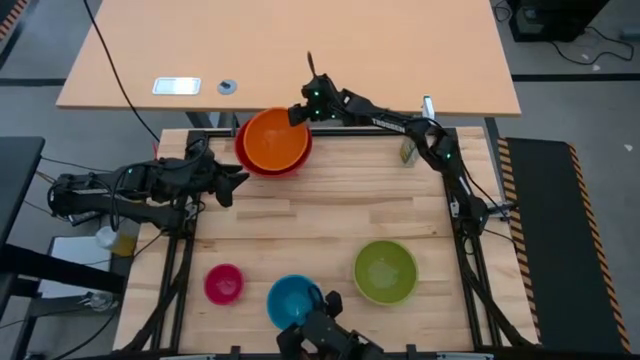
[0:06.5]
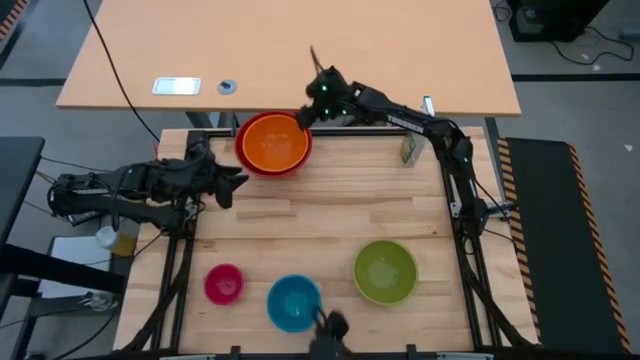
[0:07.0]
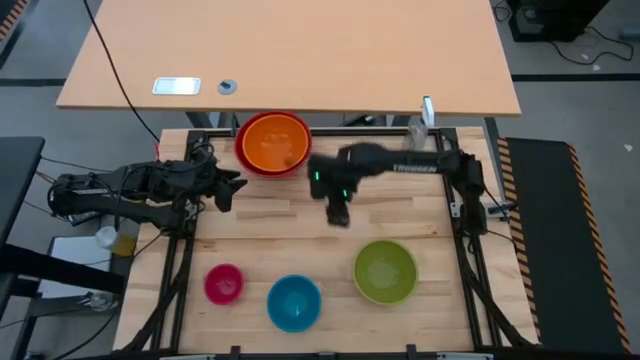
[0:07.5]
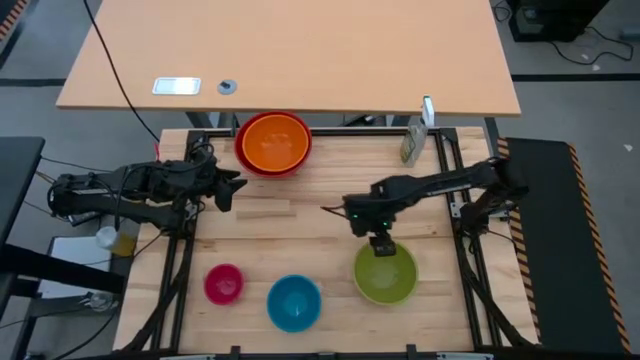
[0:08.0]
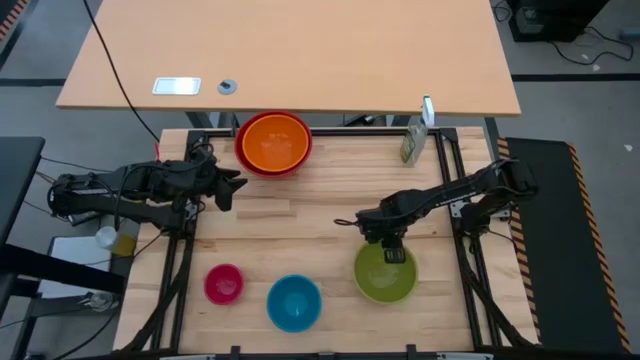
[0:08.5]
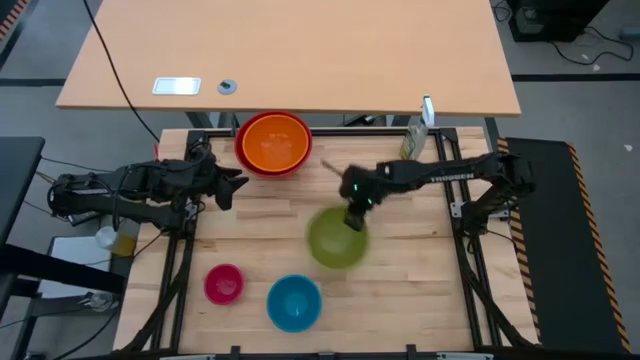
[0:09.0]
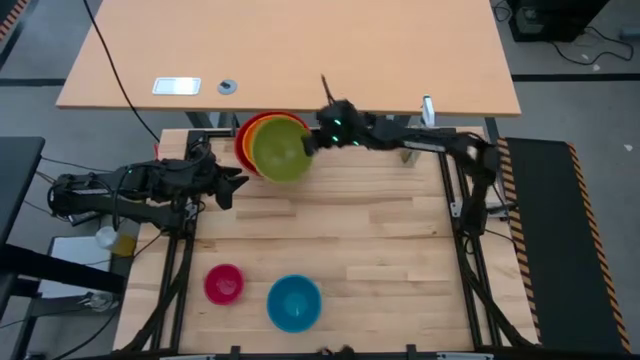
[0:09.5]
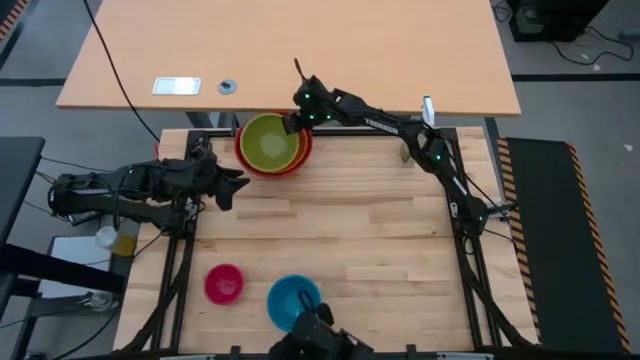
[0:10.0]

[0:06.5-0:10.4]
Stack the green bowl on top of the orange bowl

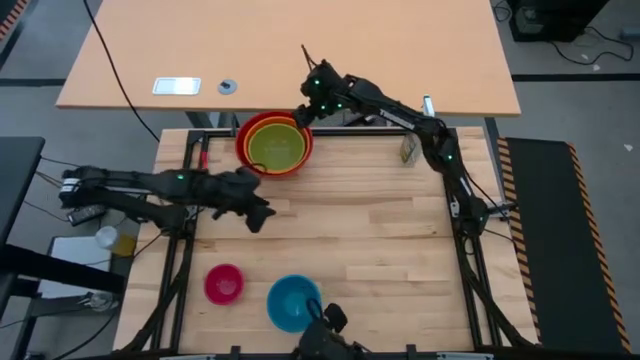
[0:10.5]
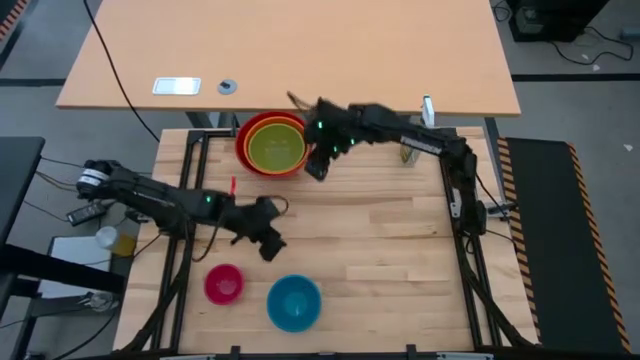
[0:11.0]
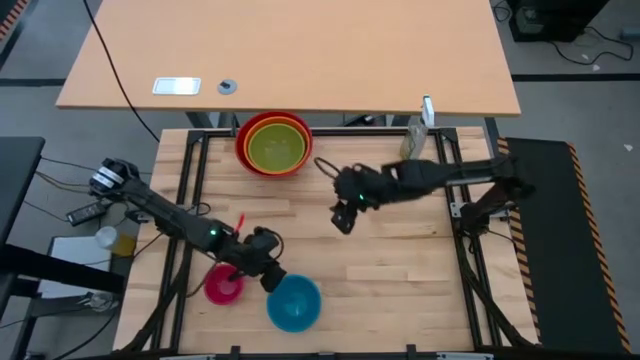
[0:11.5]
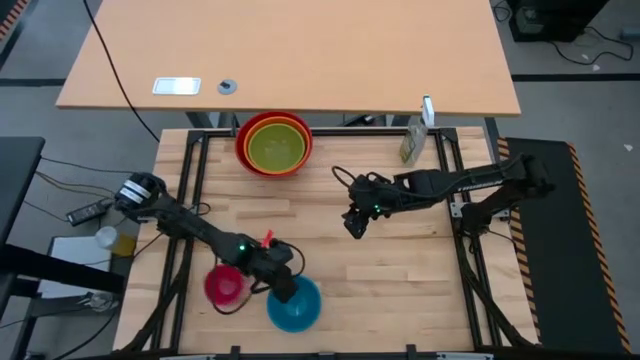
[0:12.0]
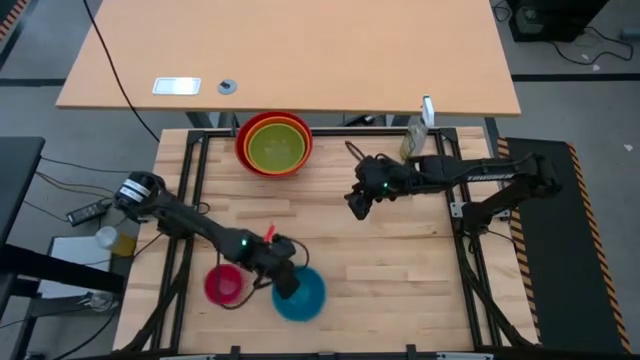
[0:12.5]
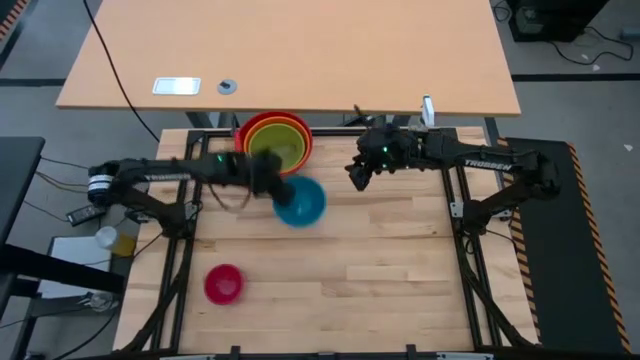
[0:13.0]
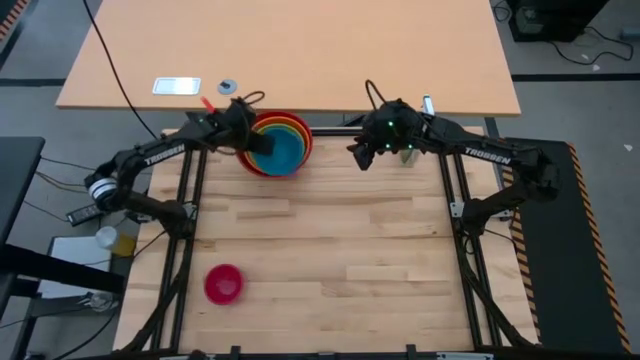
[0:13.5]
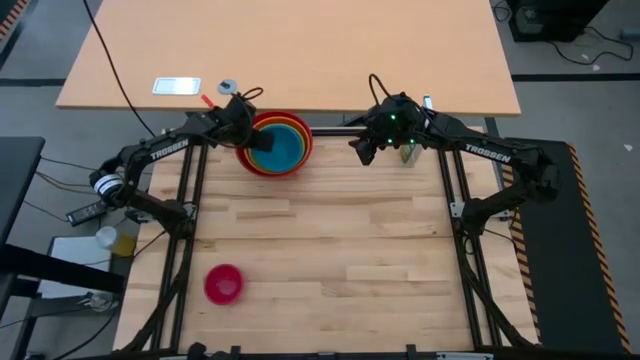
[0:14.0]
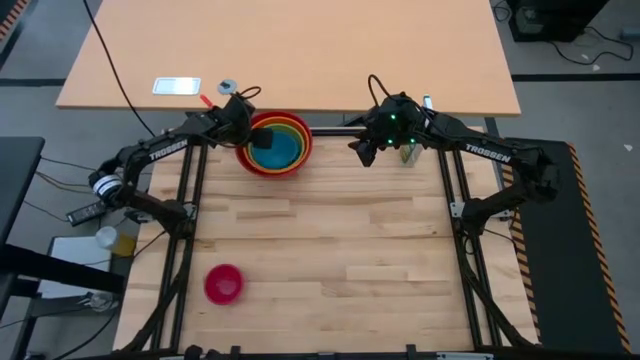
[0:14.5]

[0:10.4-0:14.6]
Stack the blue bowl on top of the green bowl

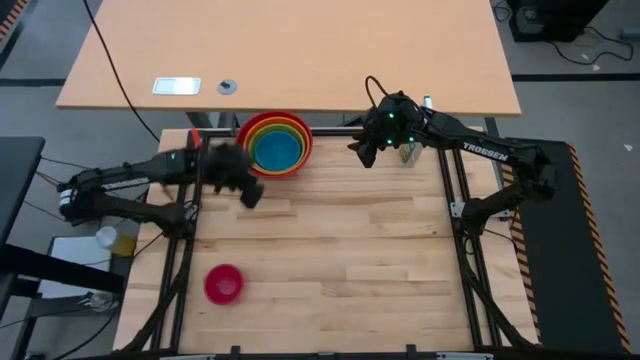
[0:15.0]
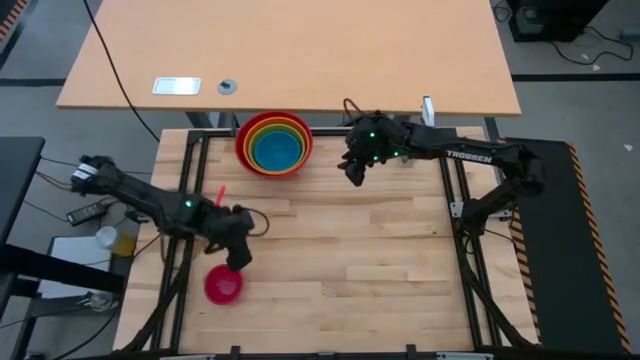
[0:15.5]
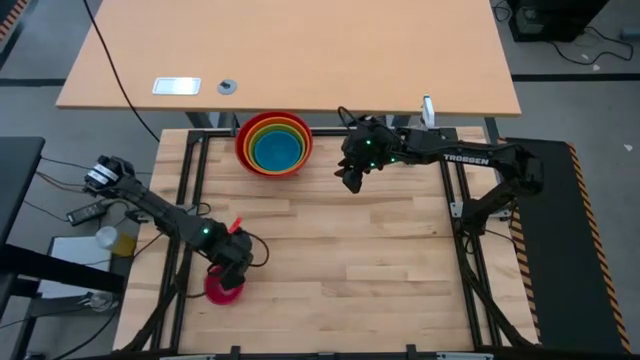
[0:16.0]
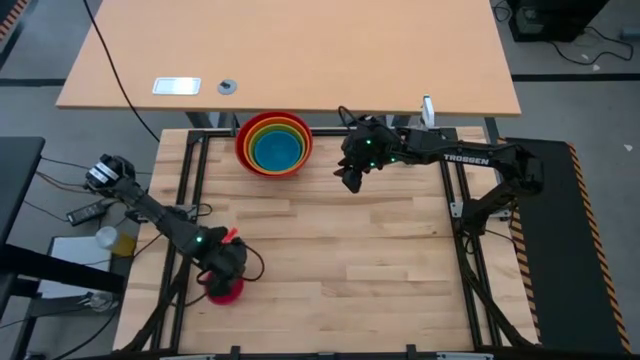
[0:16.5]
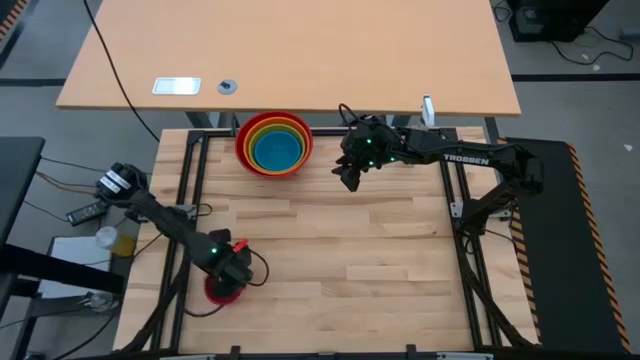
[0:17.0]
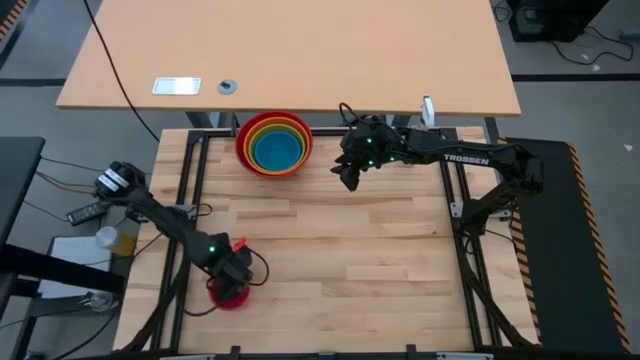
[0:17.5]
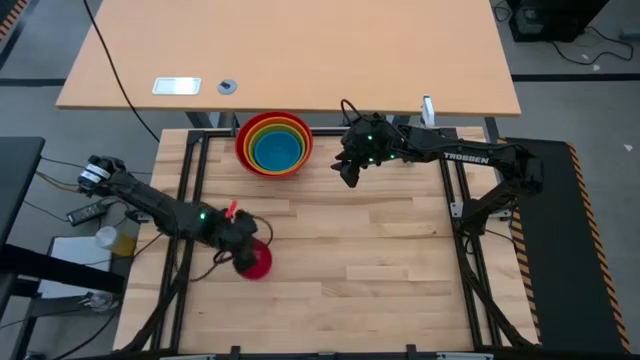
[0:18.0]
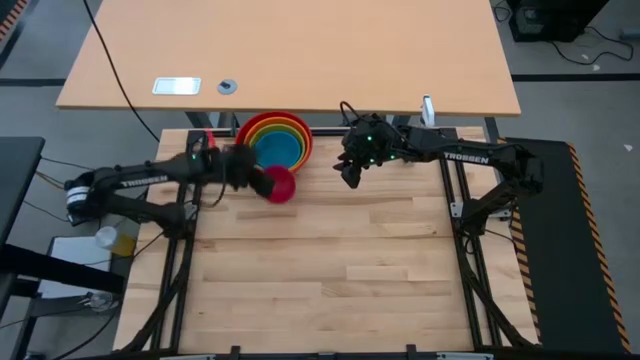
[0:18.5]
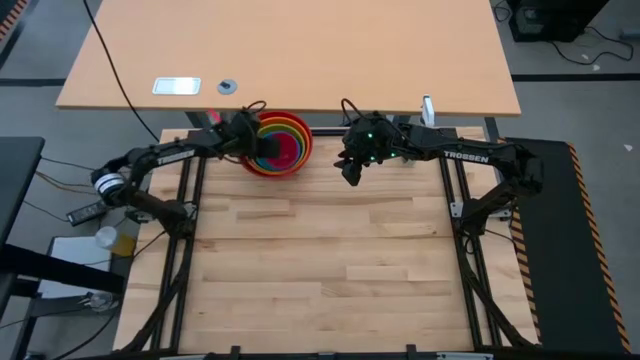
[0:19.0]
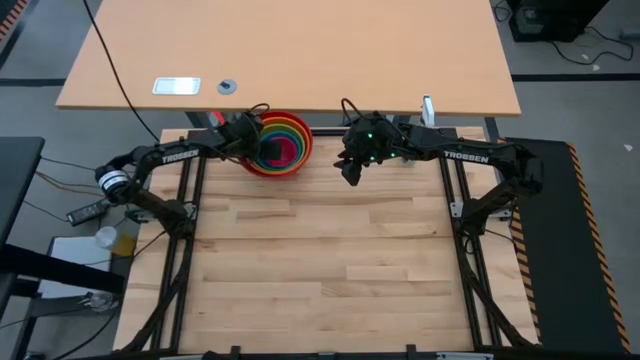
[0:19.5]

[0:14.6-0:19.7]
Stack the pink bowl on top of the blue bowl

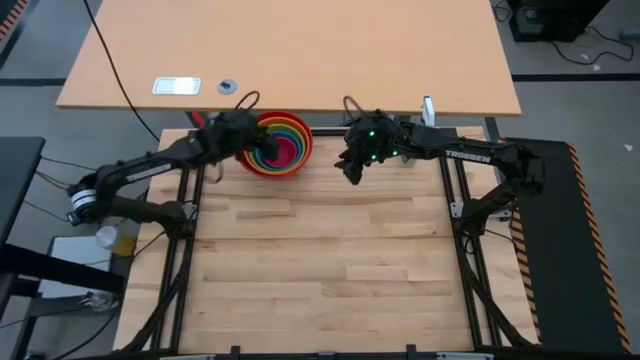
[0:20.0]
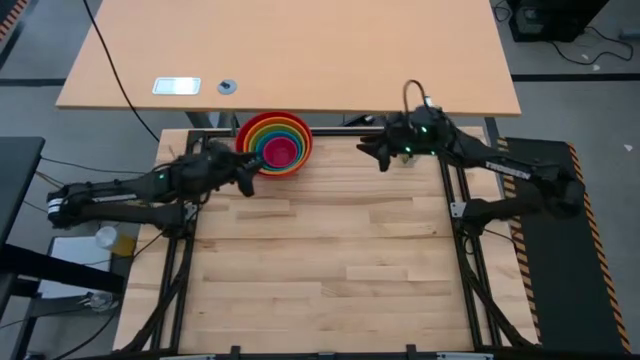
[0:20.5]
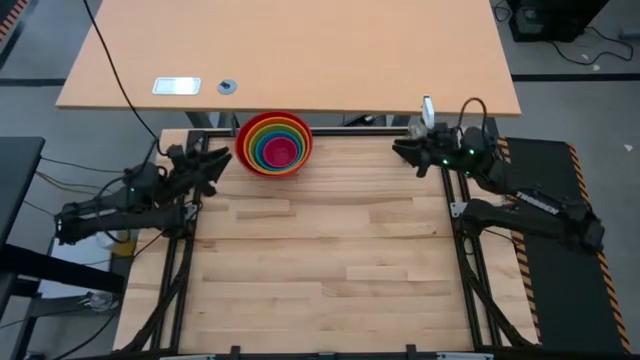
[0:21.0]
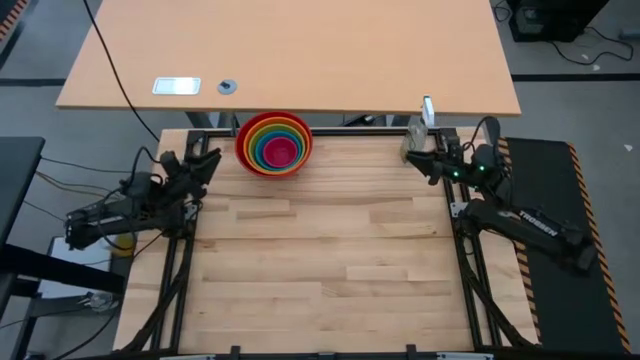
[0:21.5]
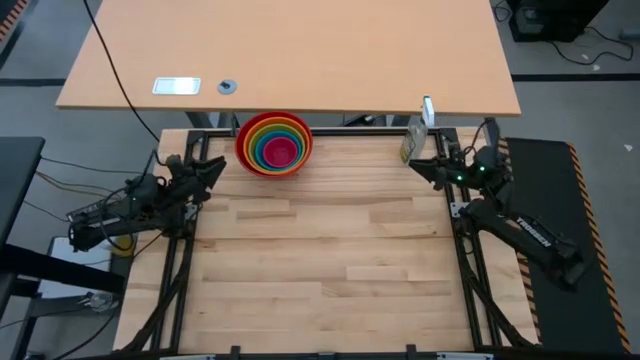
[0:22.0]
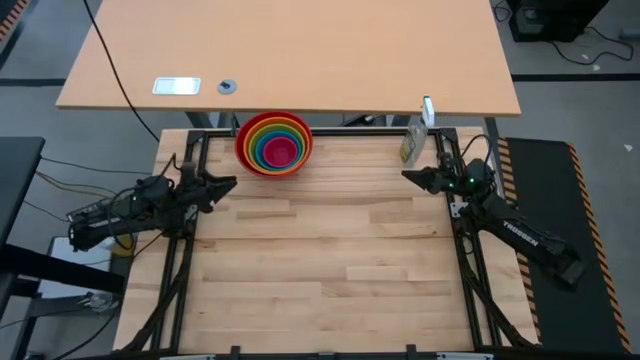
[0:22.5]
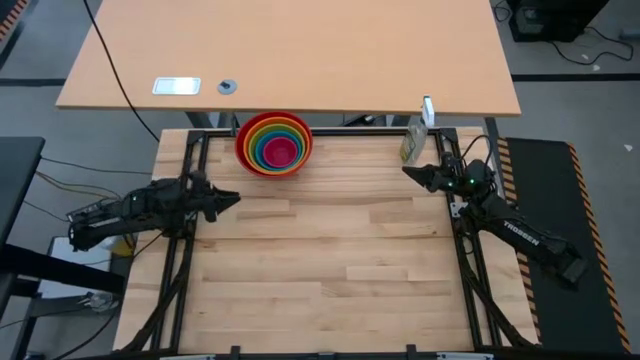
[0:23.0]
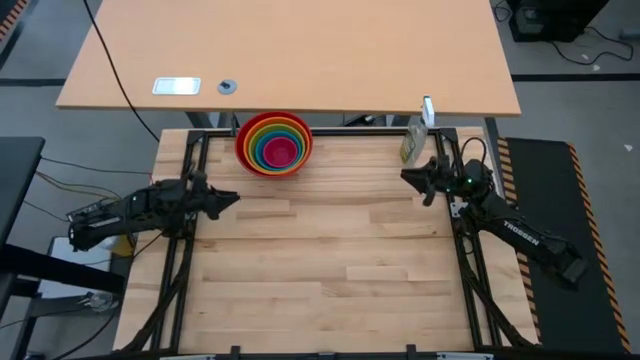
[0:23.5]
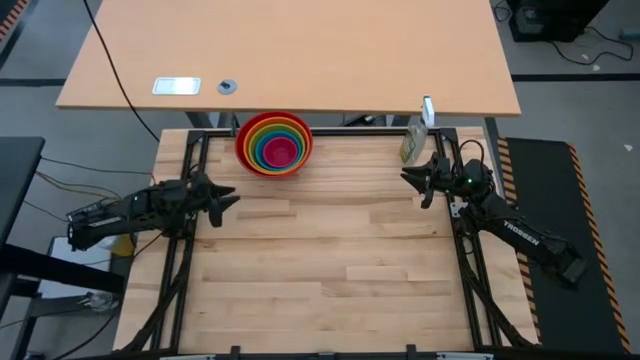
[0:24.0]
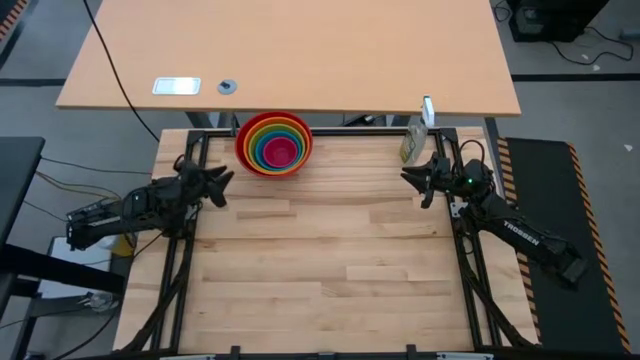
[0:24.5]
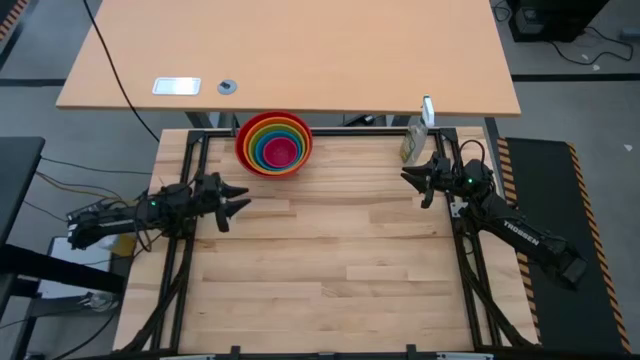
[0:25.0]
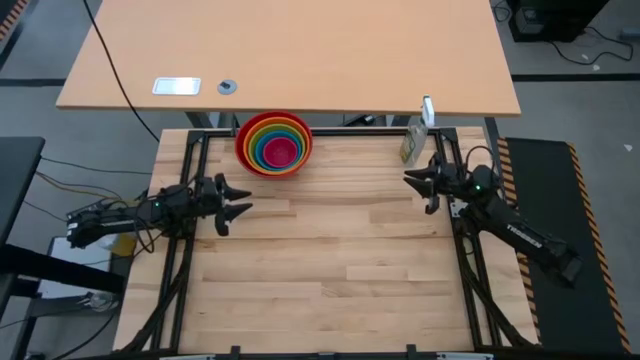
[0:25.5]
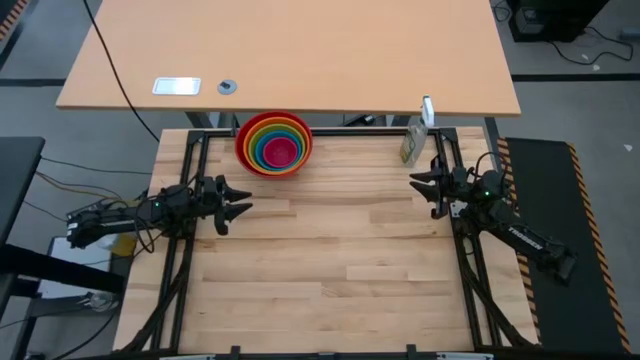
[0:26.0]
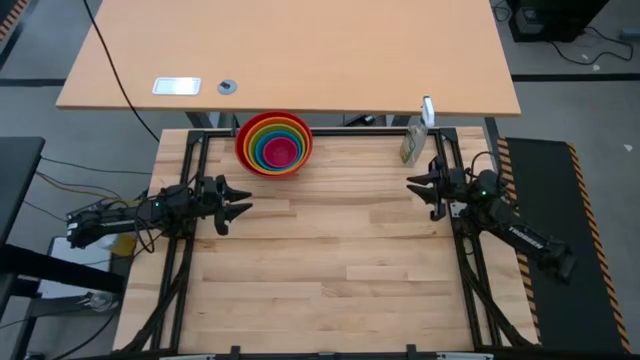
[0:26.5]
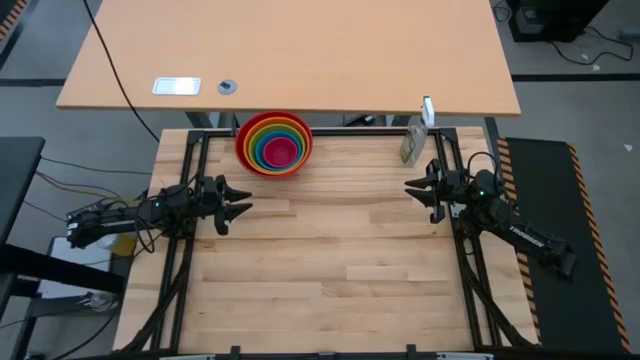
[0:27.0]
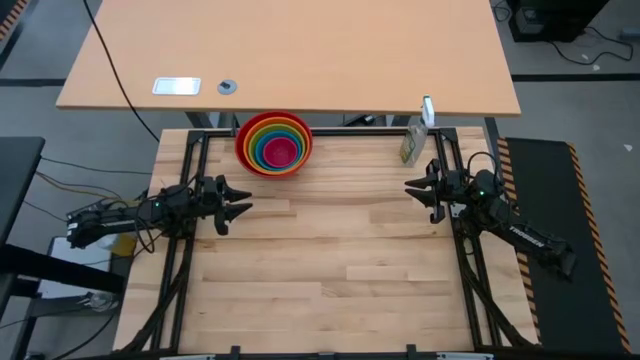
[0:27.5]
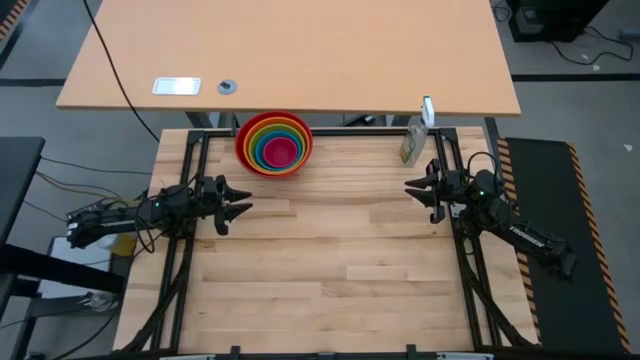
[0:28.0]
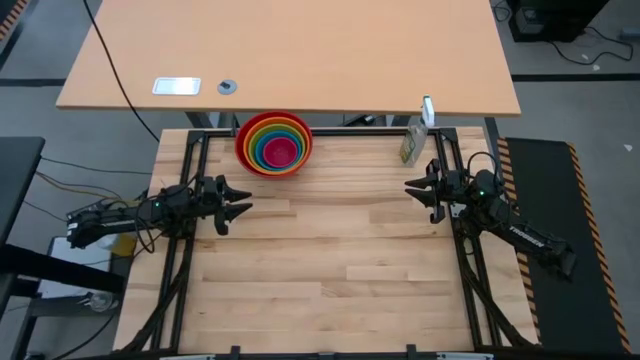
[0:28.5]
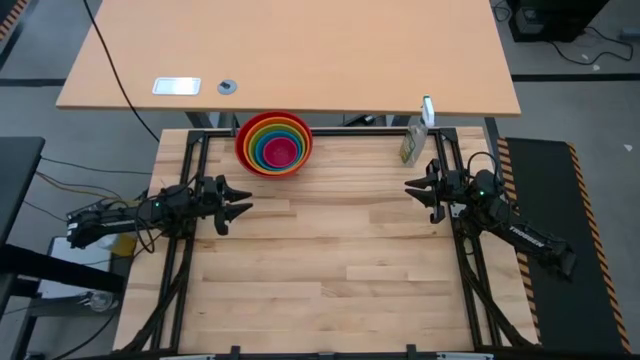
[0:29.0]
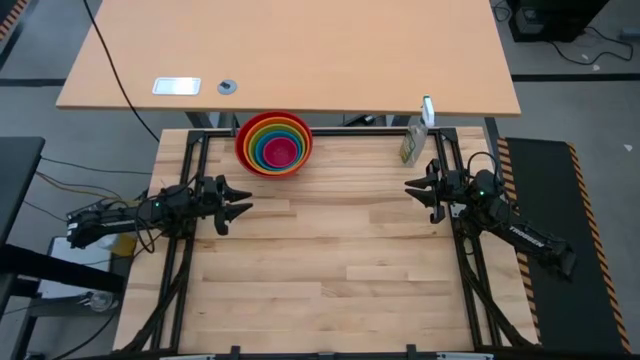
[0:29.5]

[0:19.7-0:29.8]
Return to Home Position
